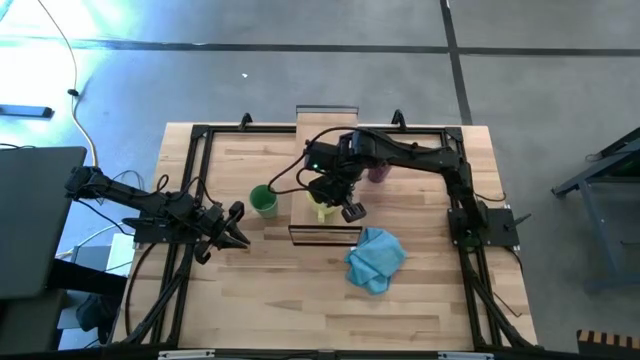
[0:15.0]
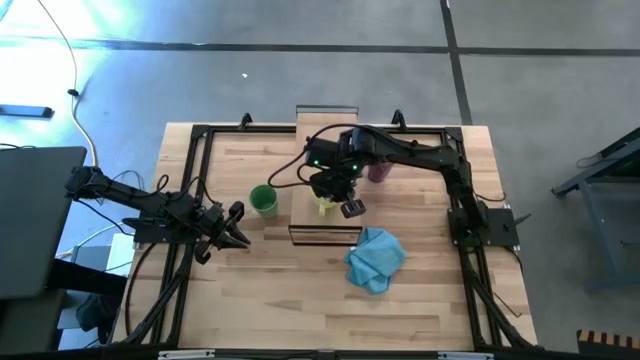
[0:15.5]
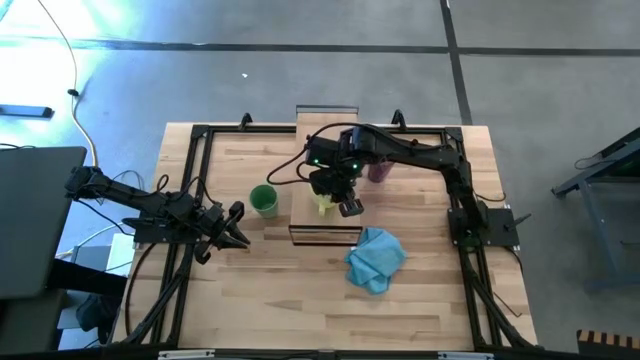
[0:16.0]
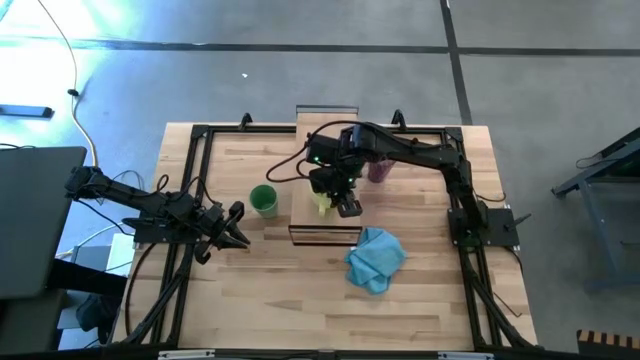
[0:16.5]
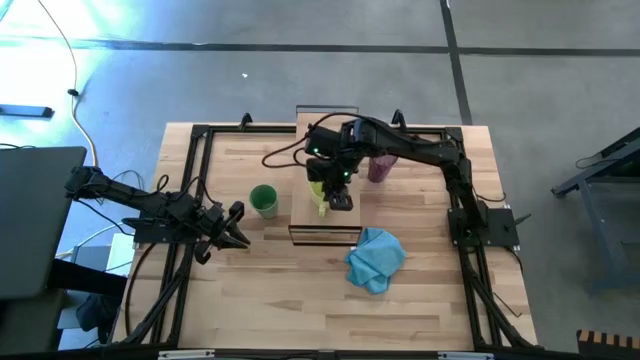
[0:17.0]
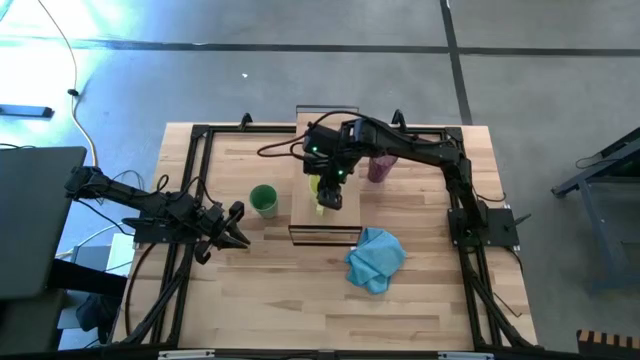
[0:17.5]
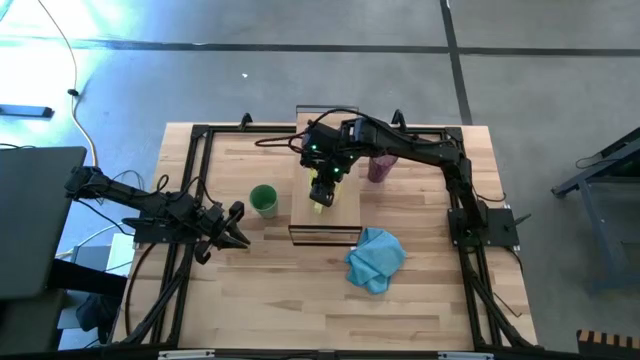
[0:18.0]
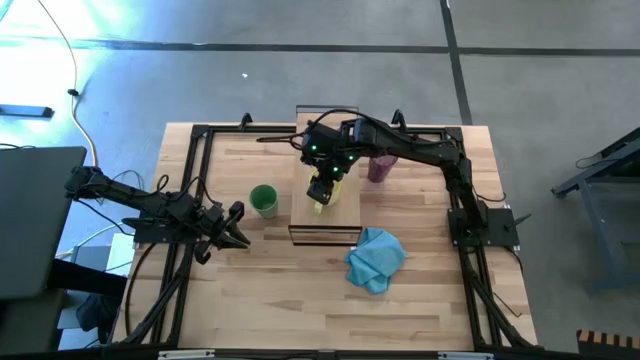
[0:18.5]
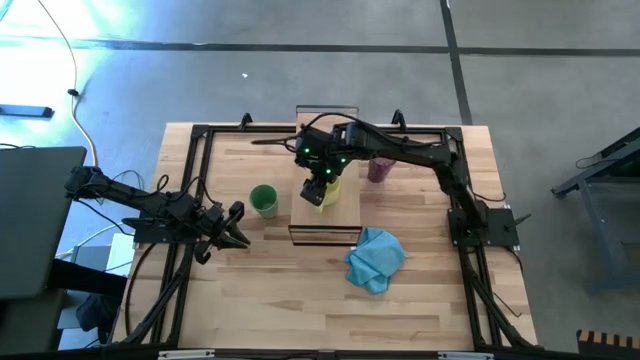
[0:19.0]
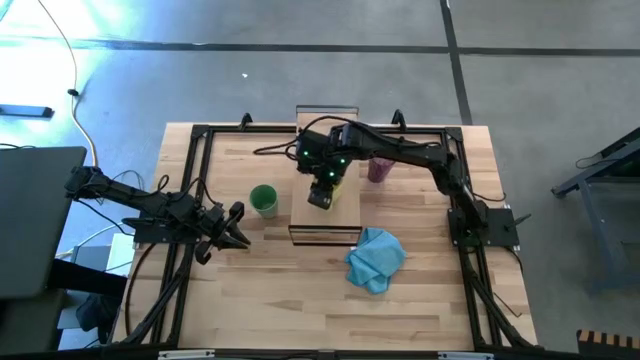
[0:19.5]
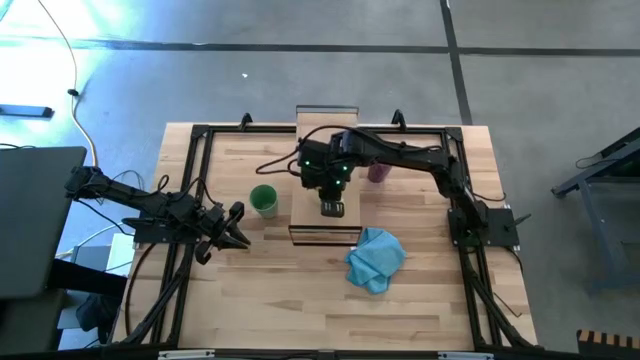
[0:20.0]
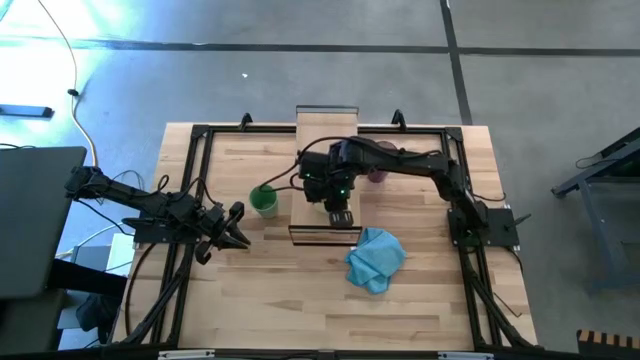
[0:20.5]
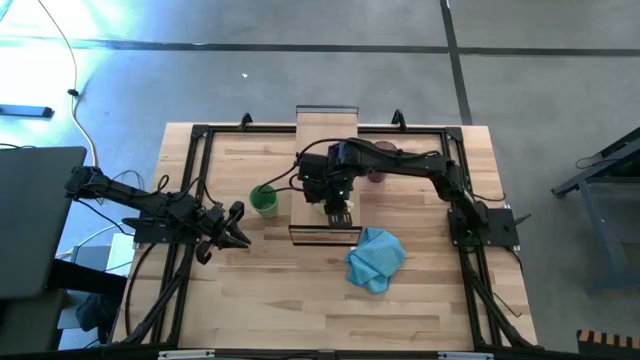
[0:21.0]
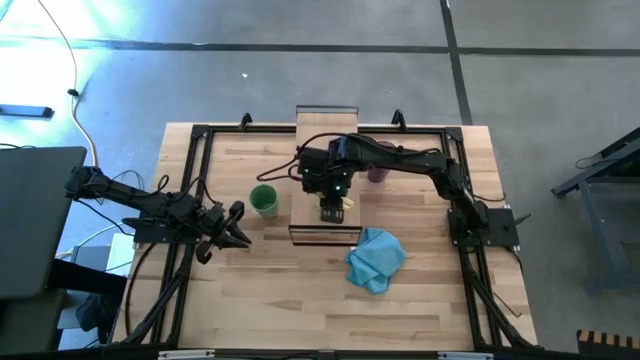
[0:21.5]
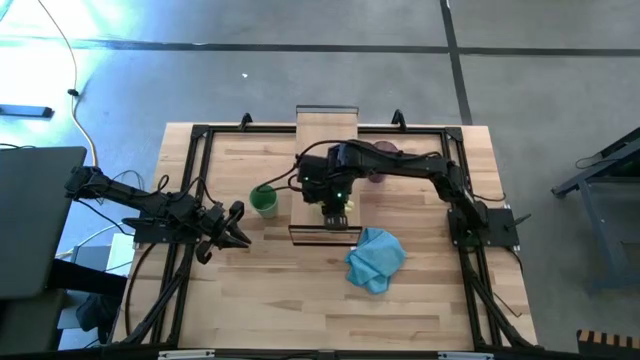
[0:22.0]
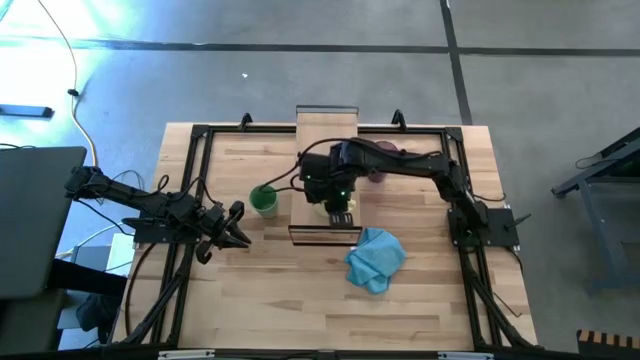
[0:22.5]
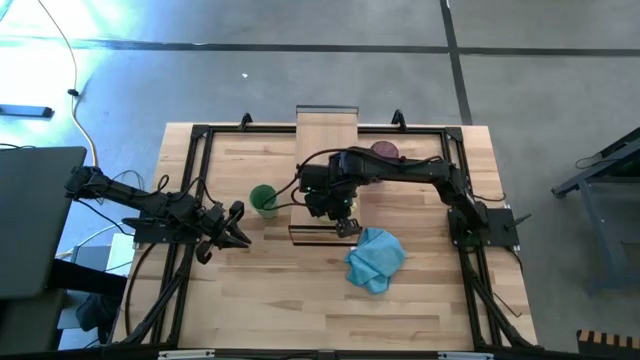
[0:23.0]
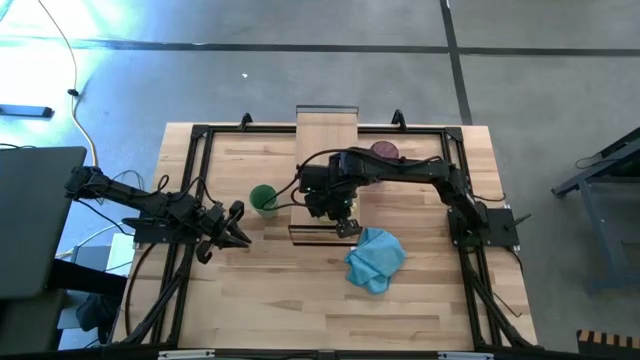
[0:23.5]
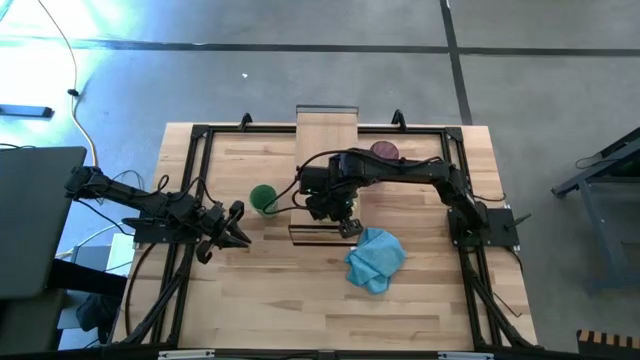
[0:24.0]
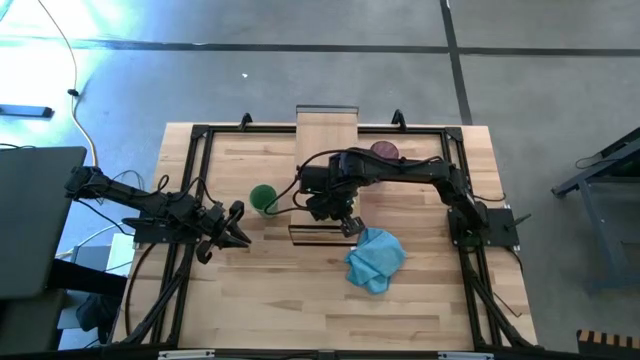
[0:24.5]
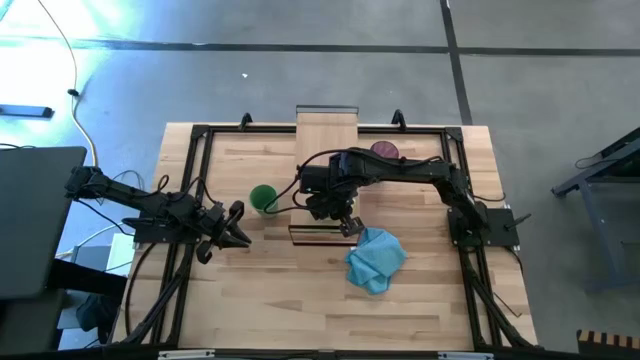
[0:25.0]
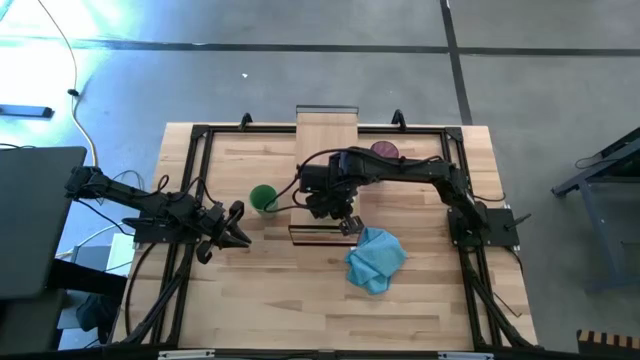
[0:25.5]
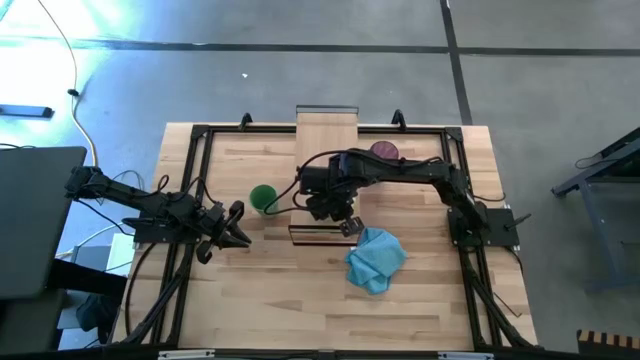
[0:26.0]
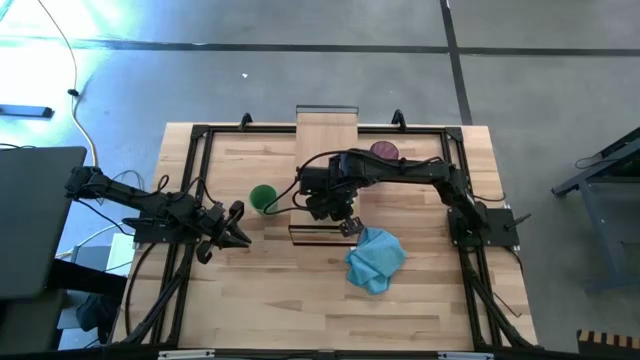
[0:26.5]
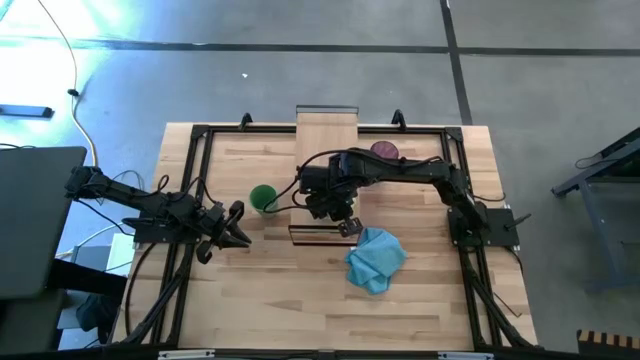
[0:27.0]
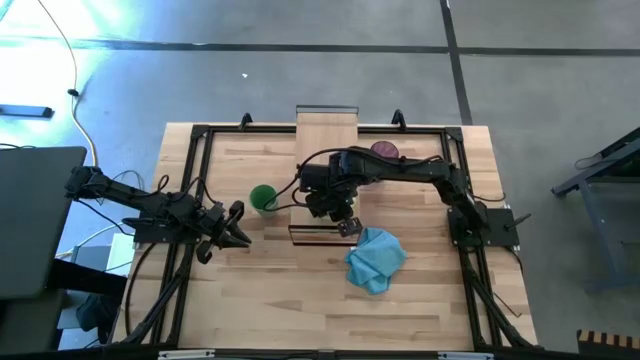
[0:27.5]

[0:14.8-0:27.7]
Task: Stack small to large cups/mugs on shelf
Put the yellow mug on the shelf

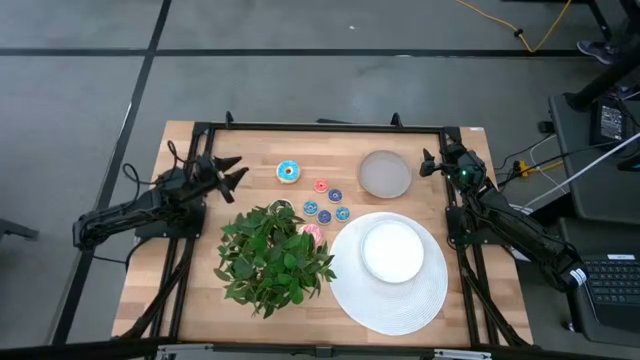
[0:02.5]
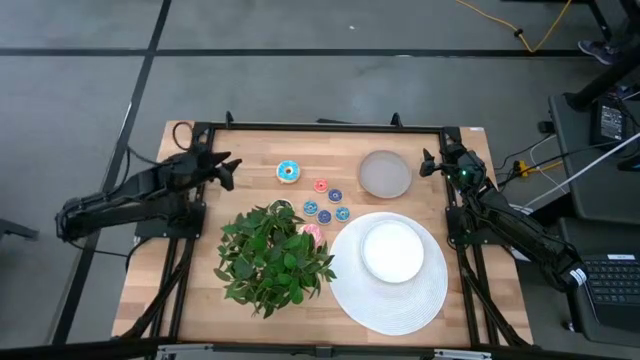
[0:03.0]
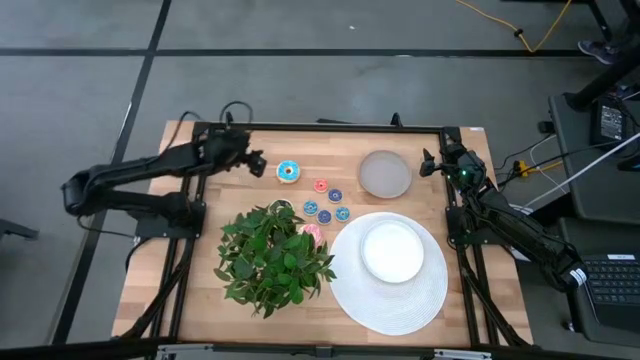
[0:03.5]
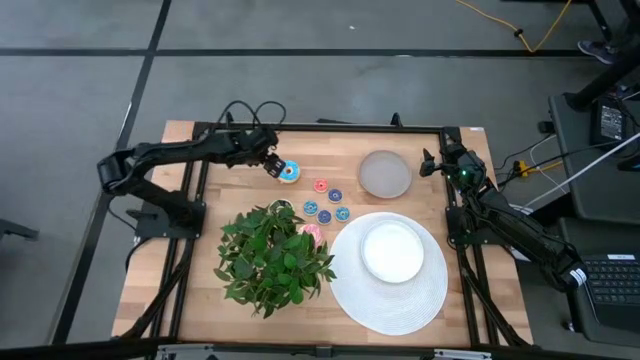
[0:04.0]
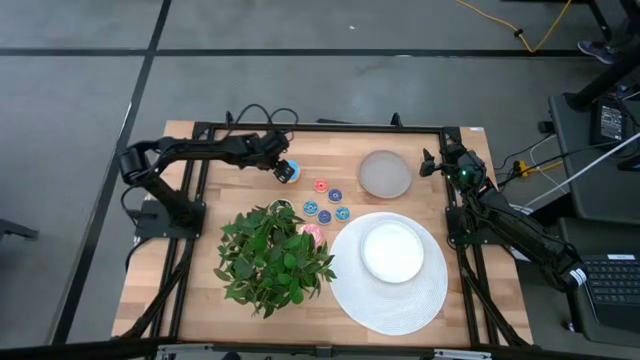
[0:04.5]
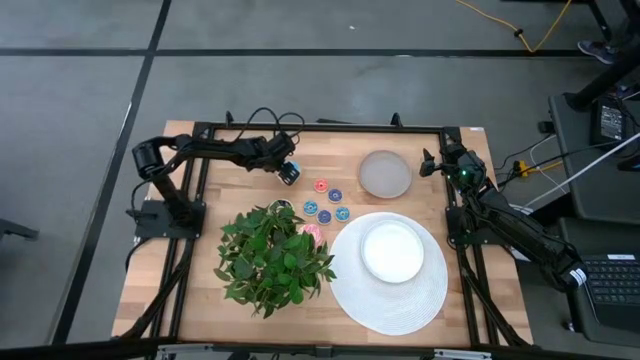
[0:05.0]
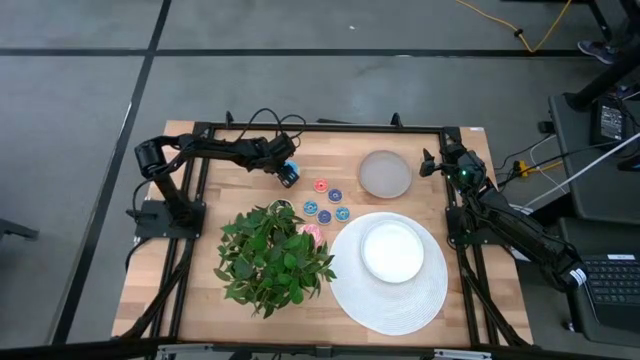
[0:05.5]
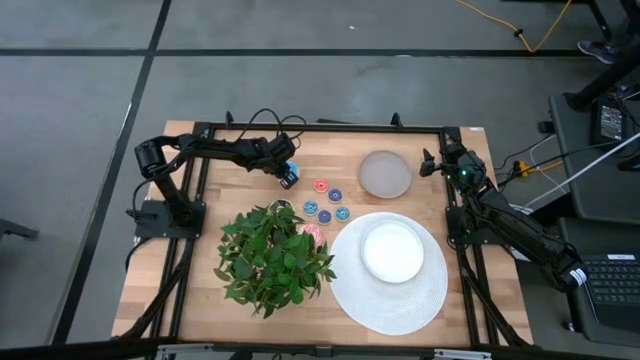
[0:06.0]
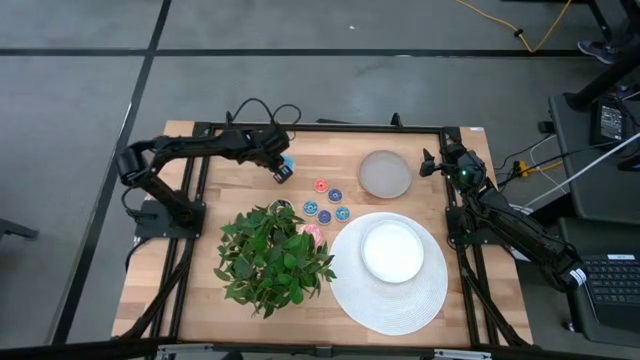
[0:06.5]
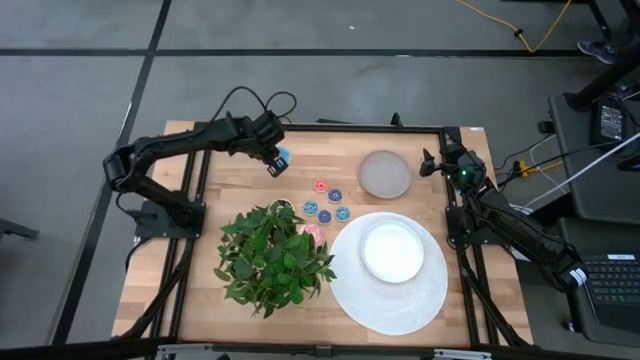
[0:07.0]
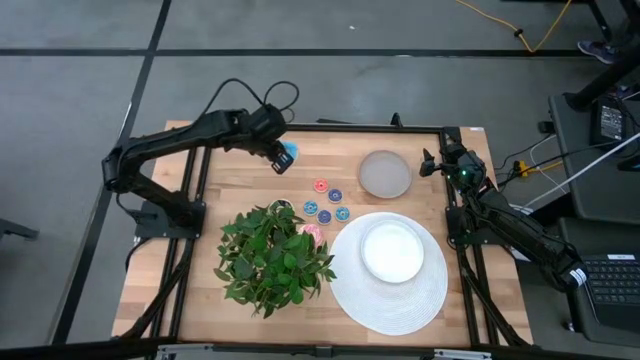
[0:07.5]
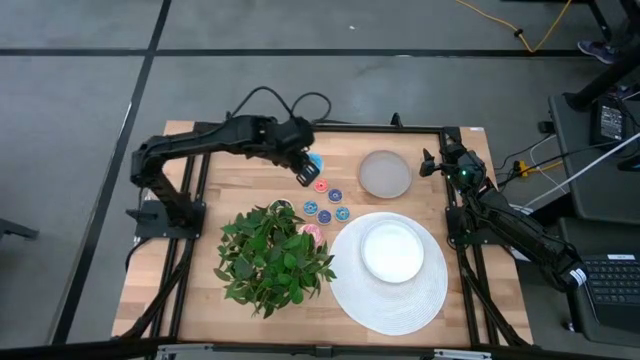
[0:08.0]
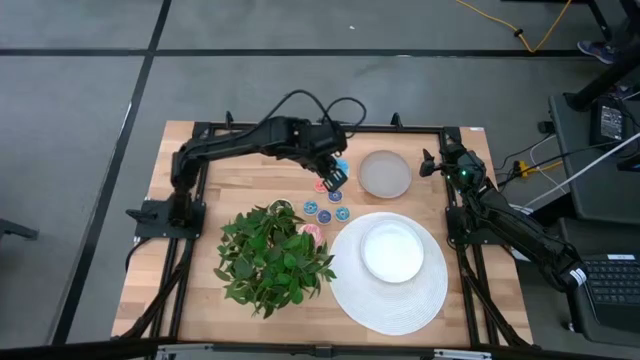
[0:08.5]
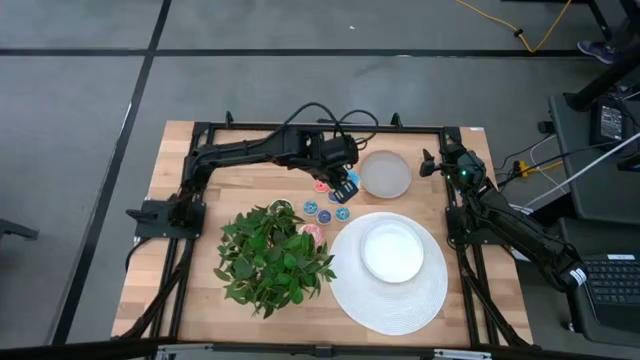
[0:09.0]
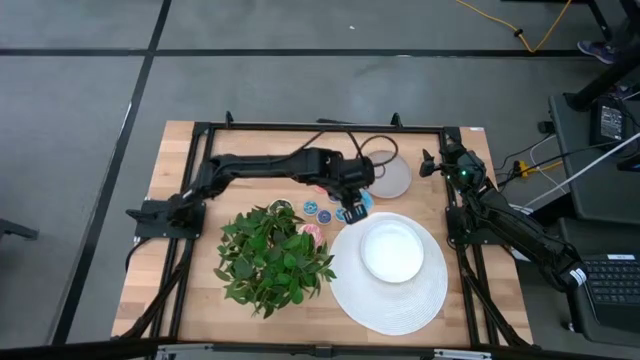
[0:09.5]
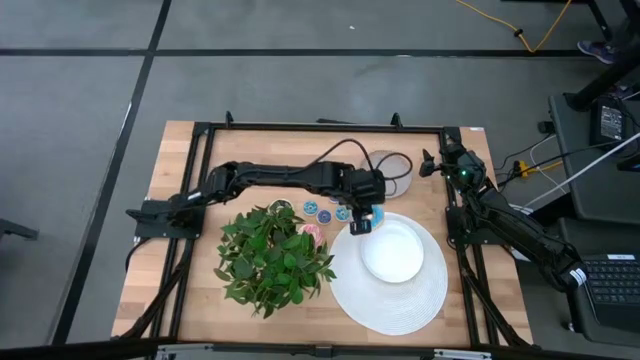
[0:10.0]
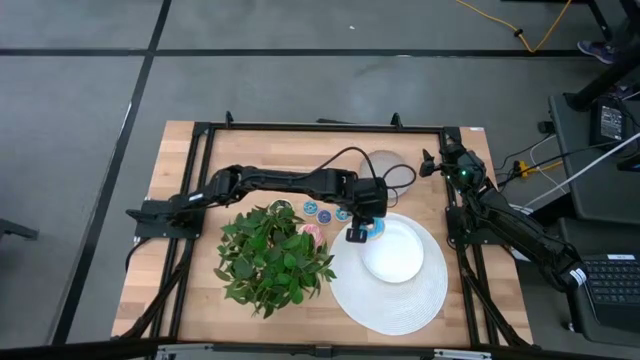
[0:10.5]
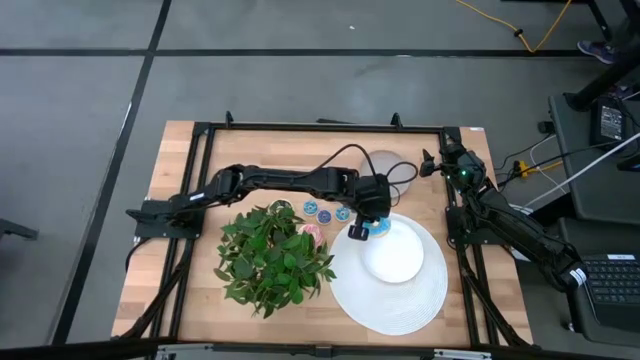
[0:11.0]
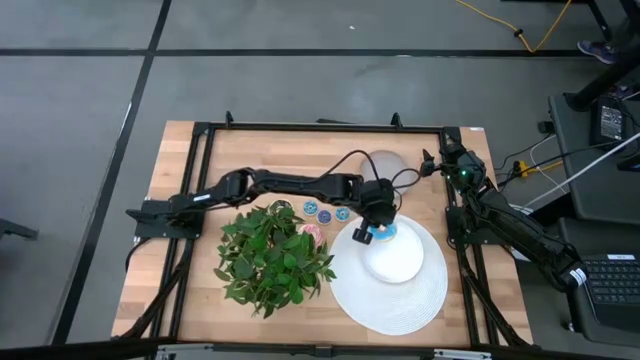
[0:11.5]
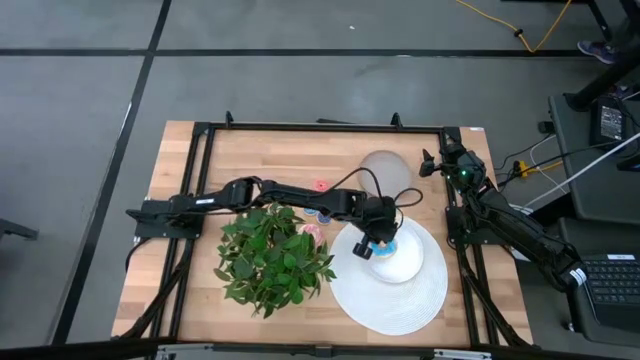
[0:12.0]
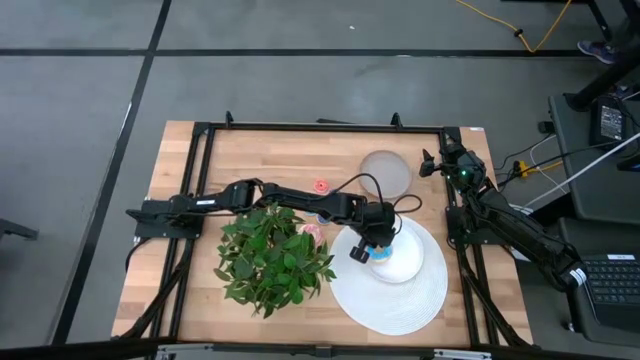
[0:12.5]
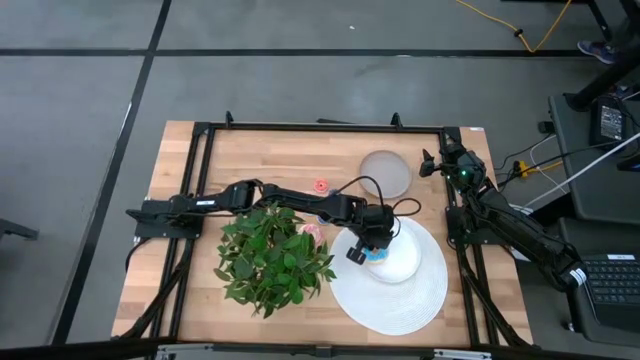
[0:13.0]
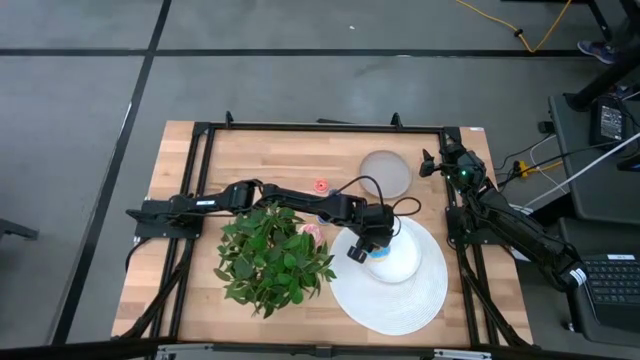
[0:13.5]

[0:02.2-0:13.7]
Task: Pick & Place donuts
Put the large blue donut onto the white plate
